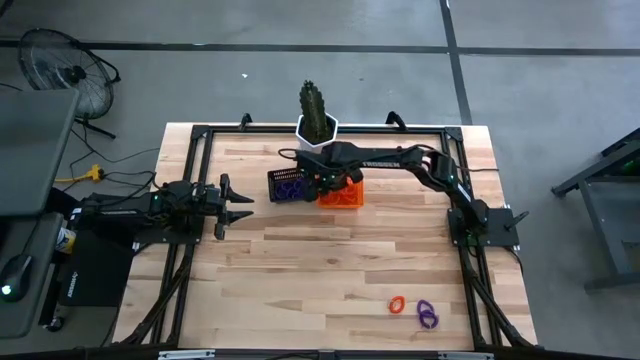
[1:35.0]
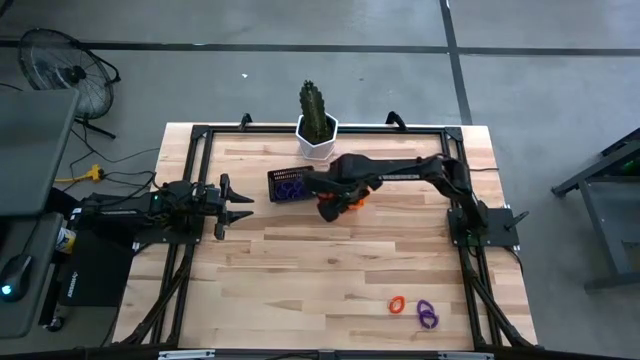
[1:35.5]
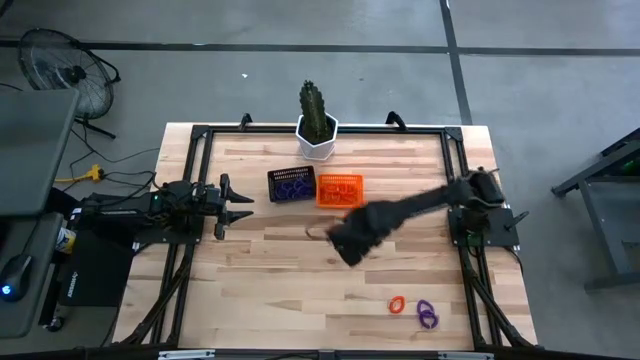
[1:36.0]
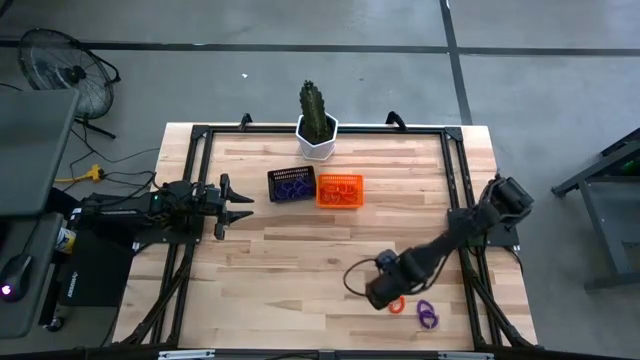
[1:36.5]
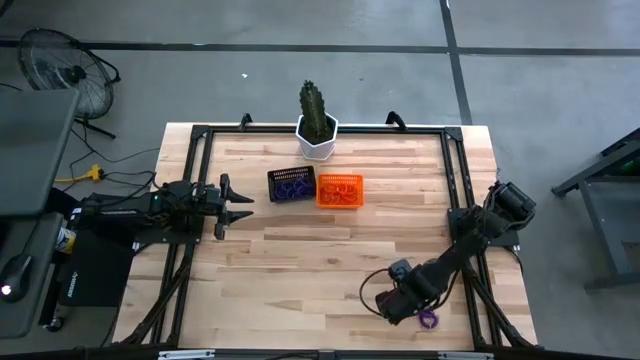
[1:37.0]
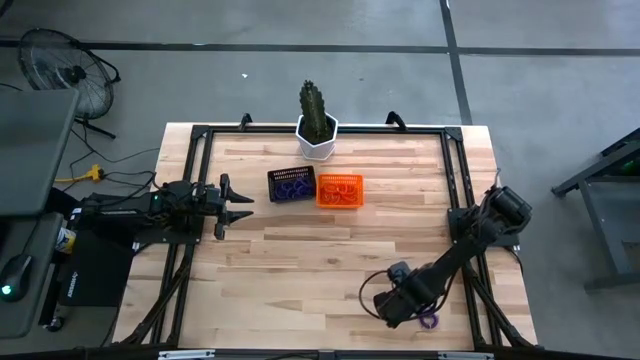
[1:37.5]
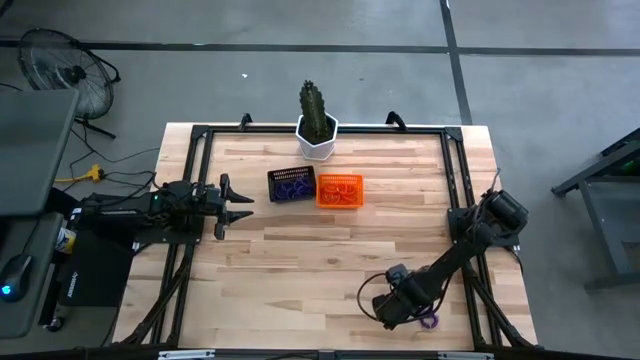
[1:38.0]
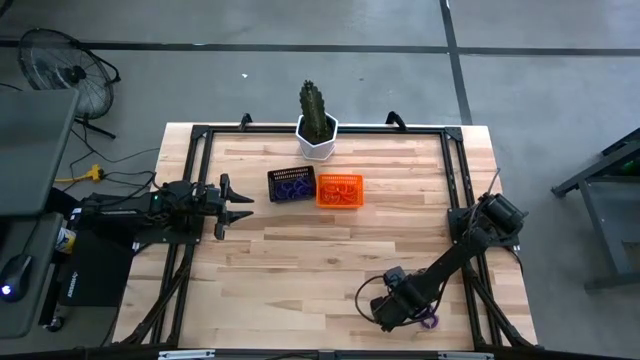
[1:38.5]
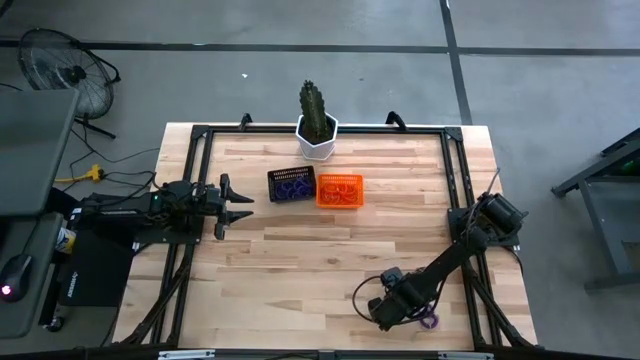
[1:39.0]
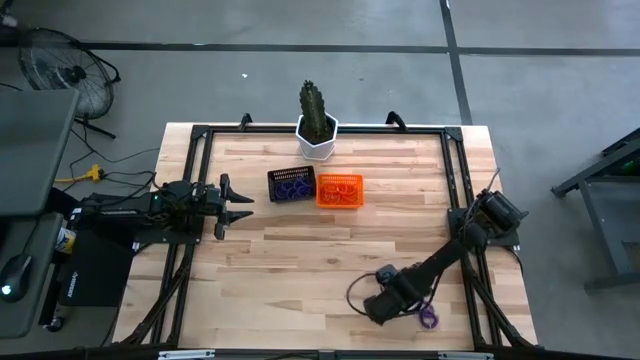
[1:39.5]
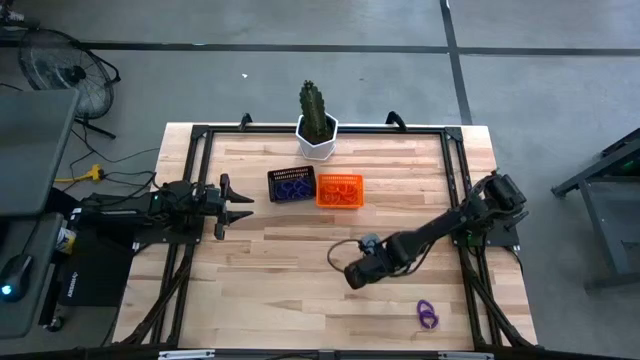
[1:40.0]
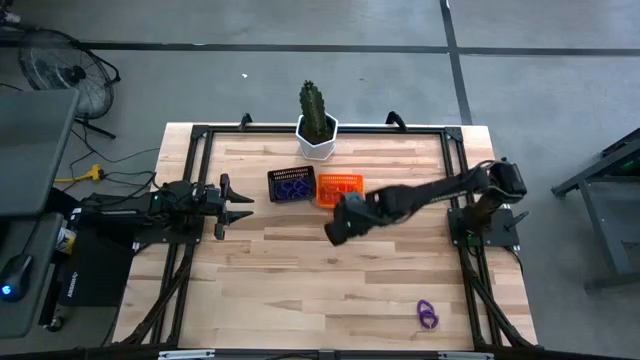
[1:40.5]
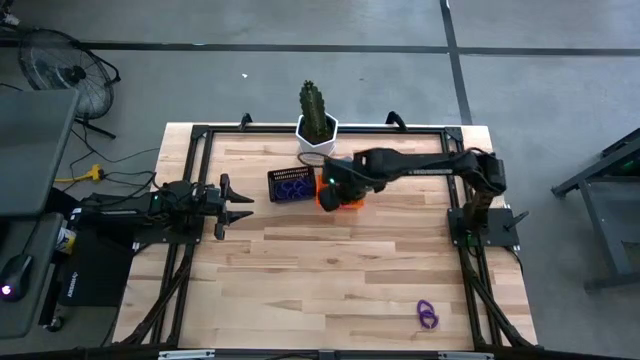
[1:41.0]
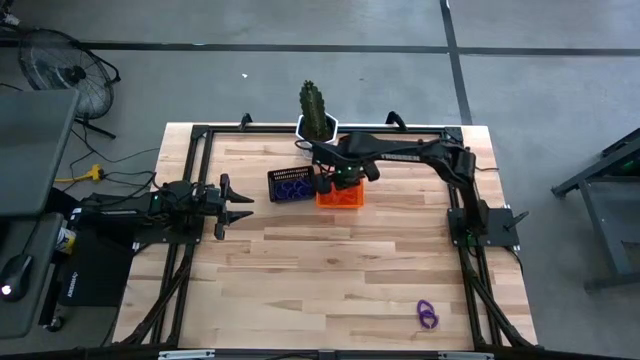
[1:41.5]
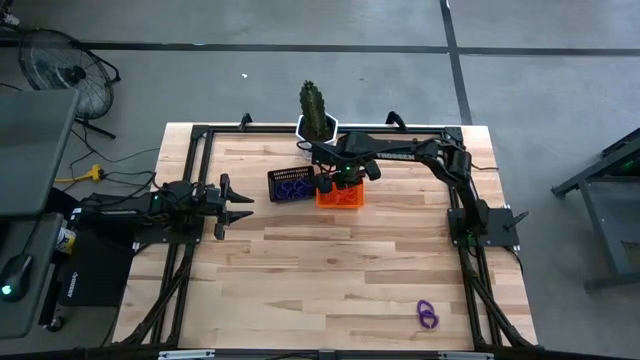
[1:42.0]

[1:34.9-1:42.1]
Task: Sort spring keychains
Put the orange spring keychain in the orange bin

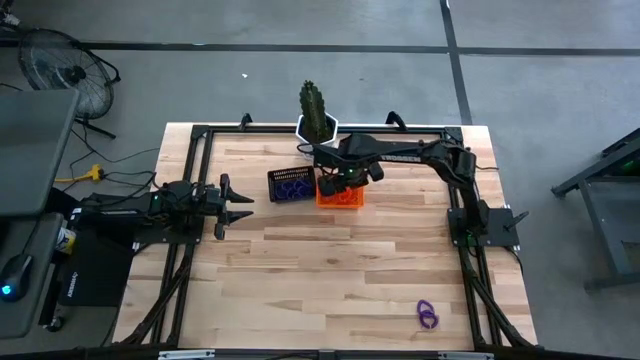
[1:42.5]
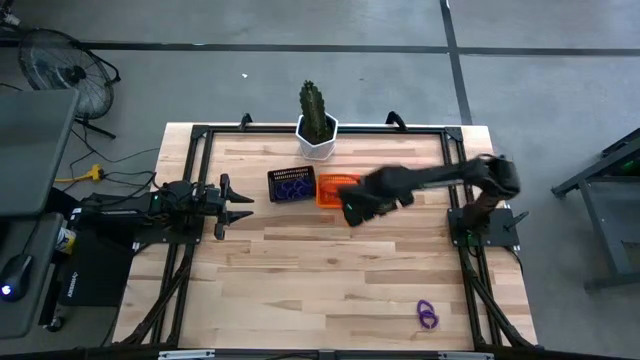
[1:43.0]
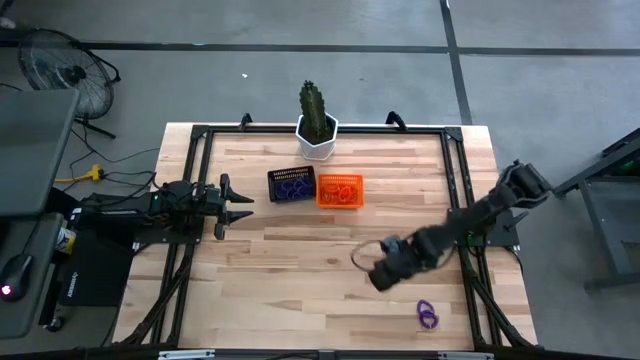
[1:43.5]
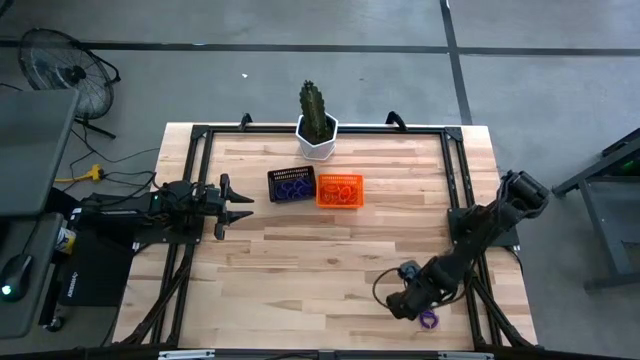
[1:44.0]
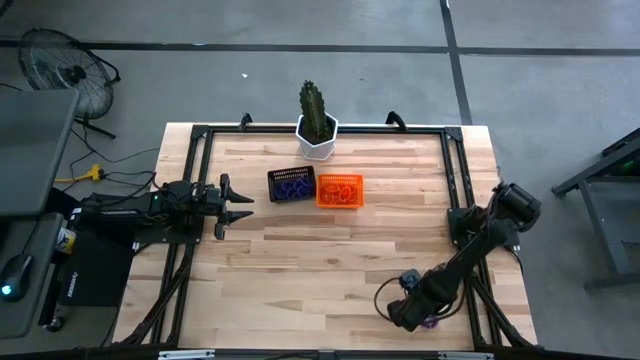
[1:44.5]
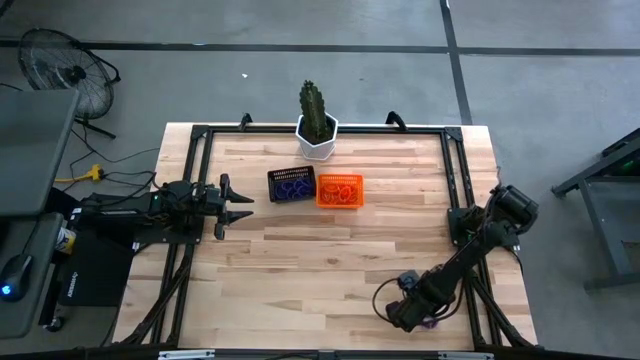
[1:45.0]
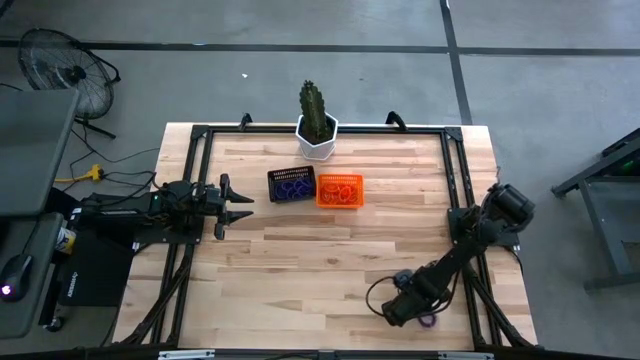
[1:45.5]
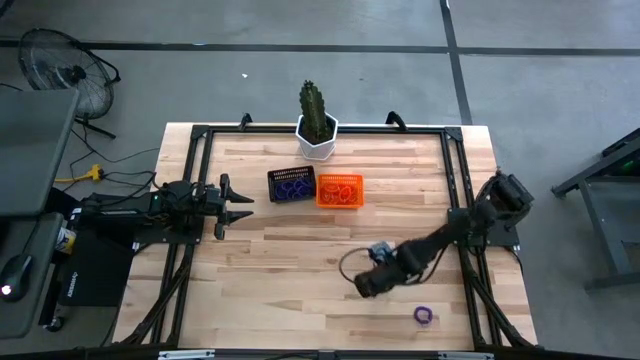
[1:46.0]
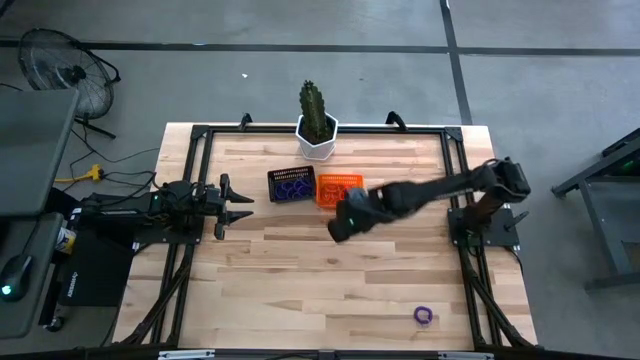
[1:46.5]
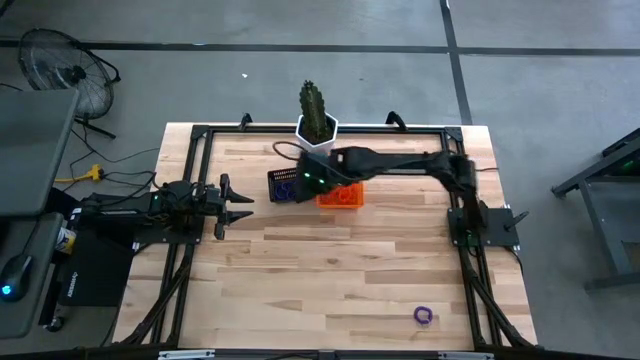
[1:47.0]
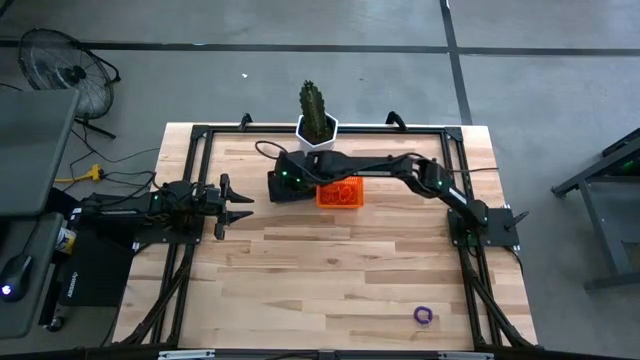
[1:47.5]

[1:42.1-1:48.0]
Put the purple spring keychain in the black bin

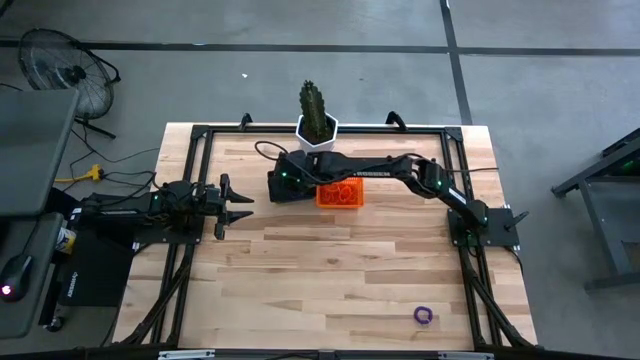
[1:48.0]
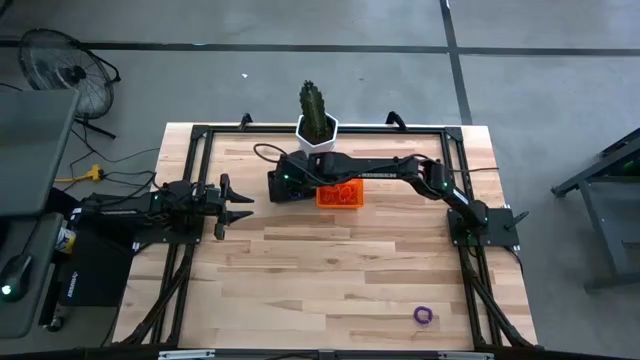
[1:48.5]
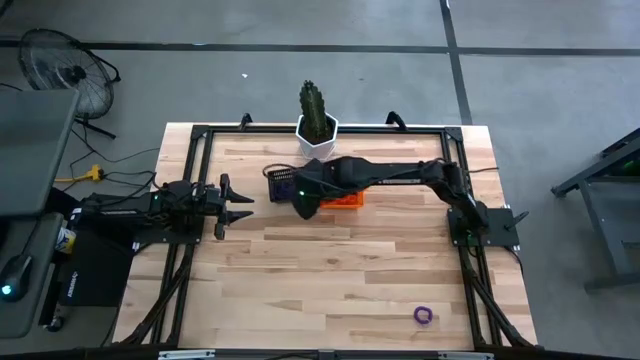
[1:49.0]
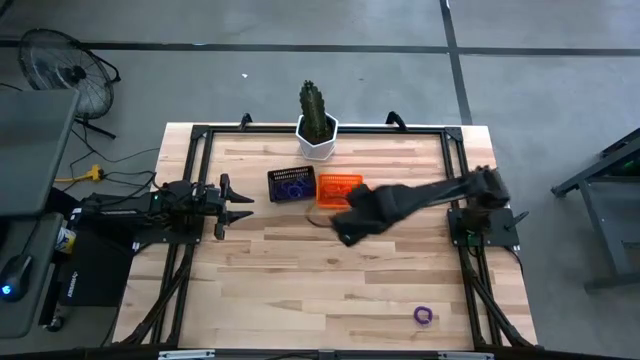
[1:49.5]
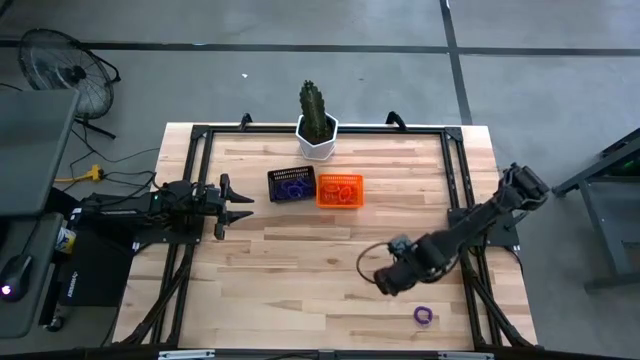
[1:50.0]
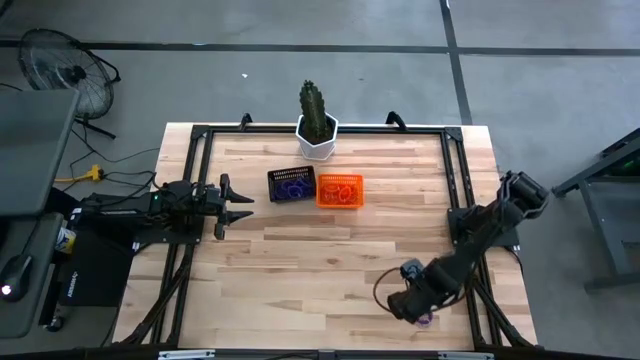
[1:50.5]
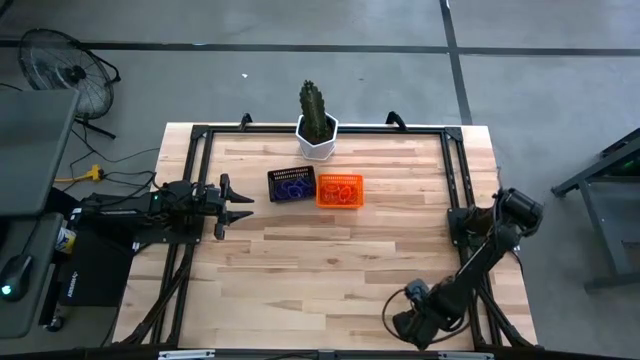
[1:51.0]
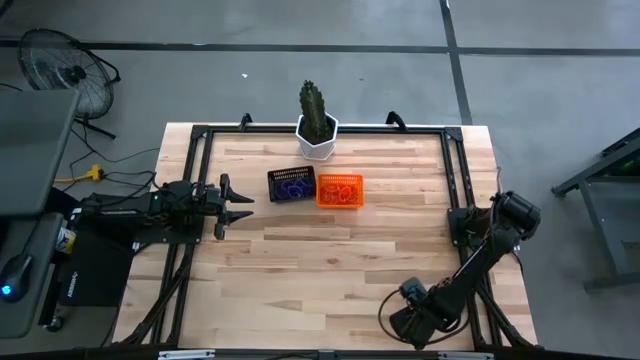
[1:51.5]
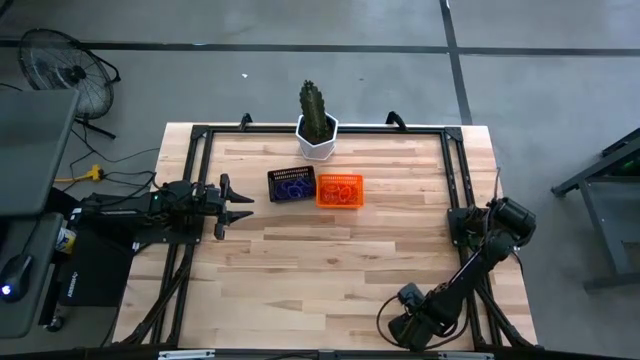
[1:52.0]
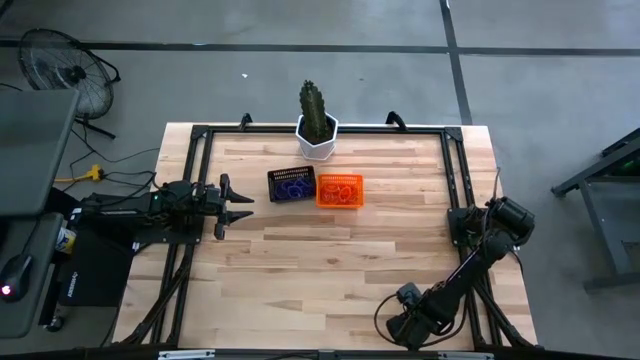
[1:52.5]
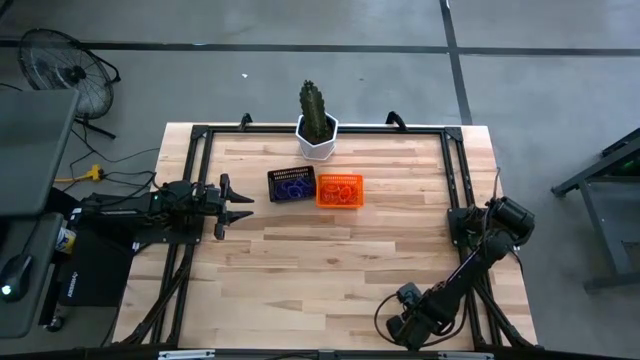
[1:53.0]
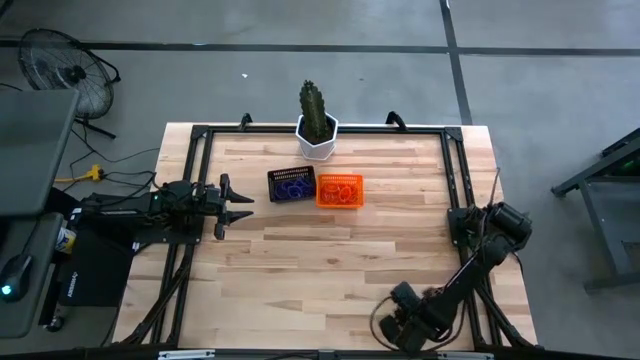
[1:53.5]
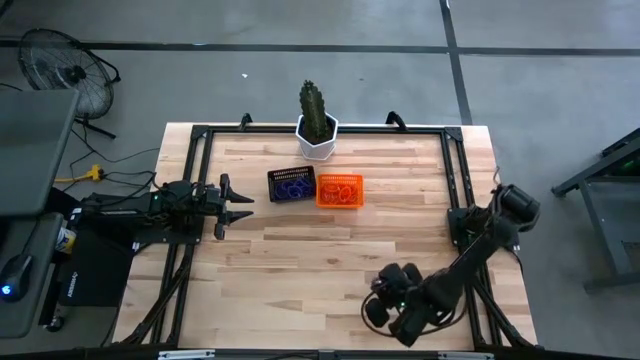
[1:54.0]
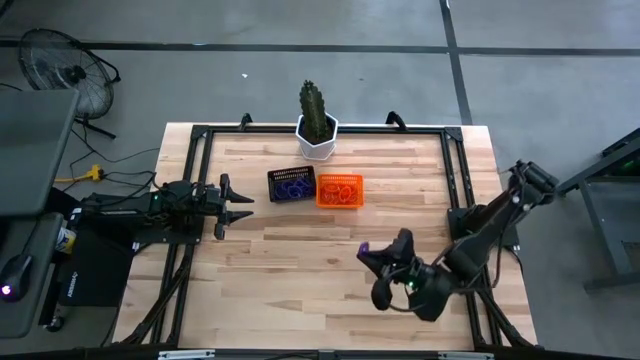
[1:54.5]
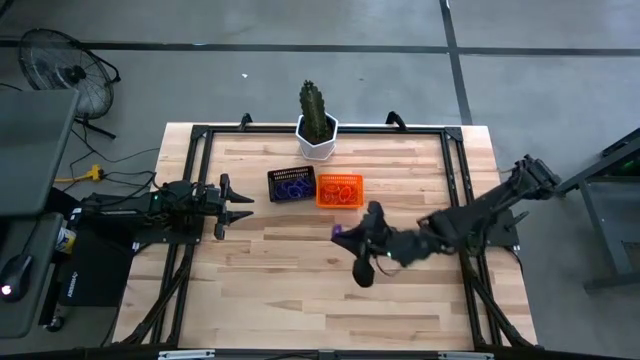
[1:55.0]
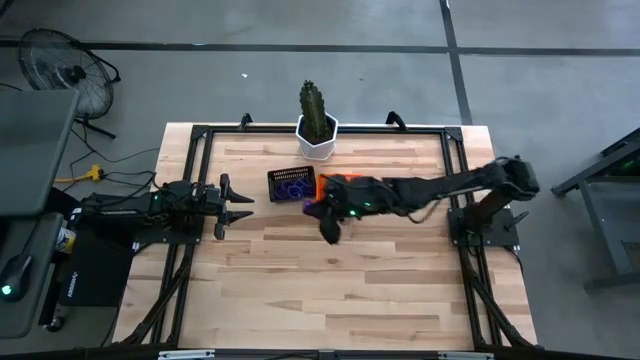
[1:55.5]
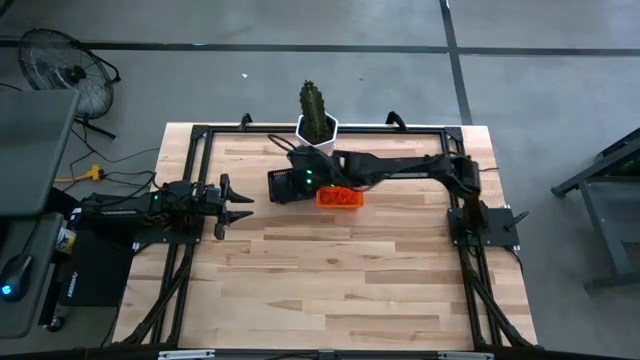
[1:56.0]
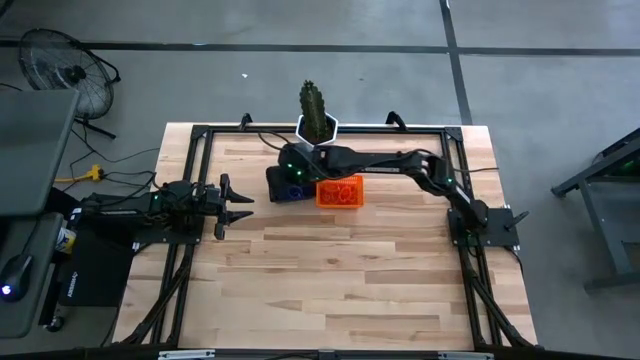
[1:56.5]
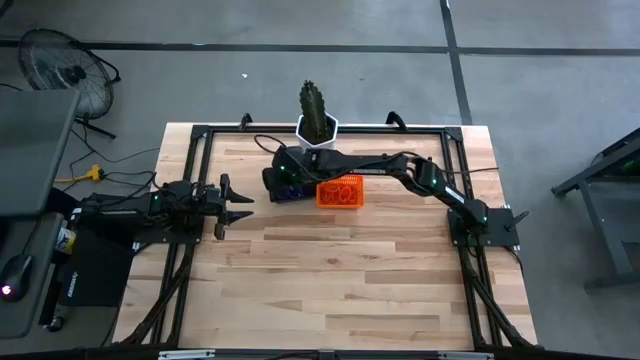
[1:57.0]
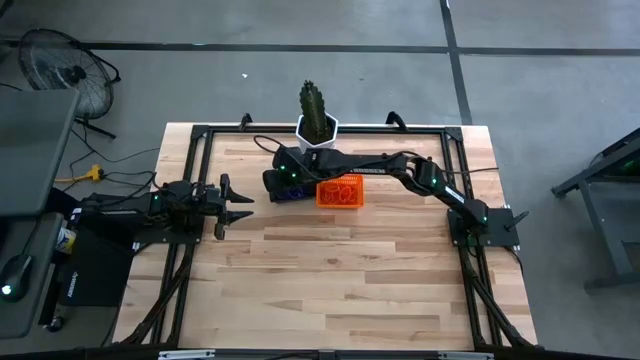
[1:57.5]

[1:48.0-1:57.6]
Put the purple spring keychain in the black bin
